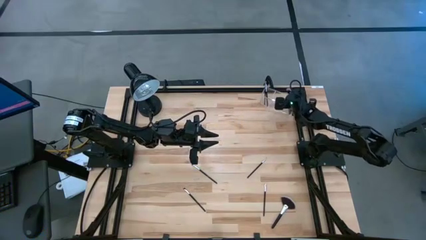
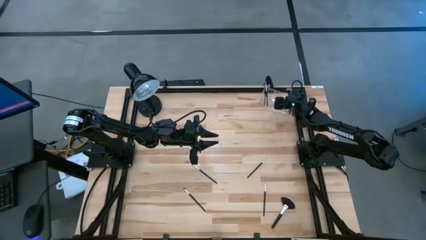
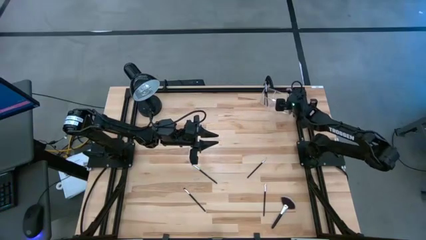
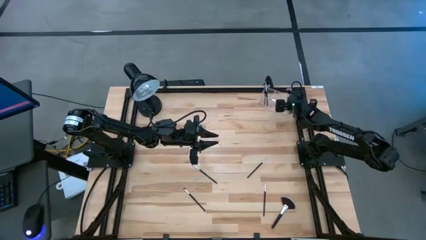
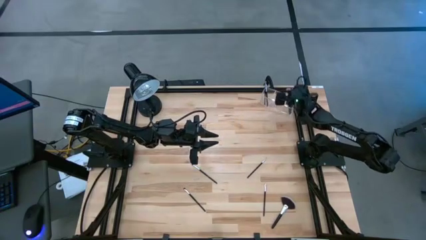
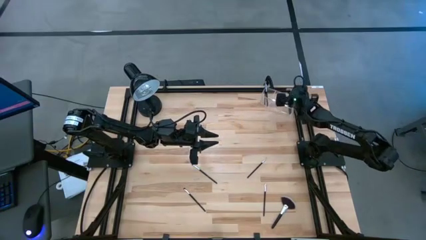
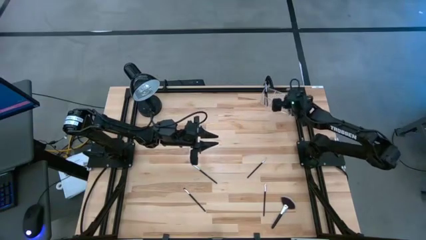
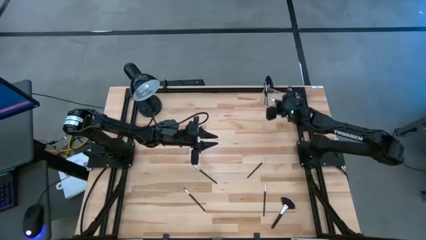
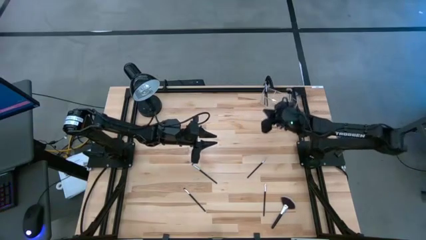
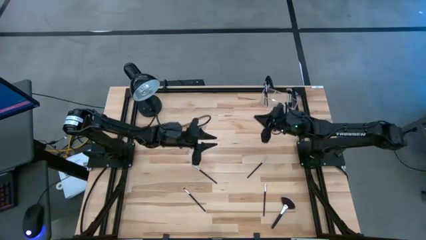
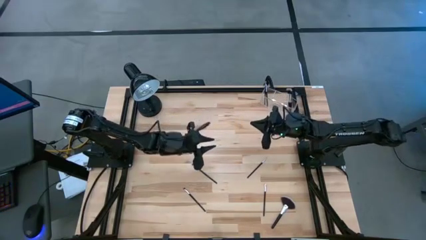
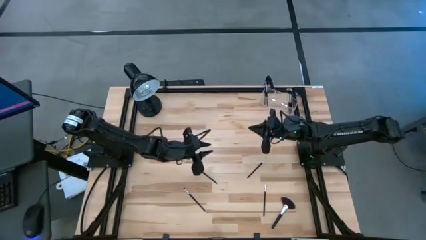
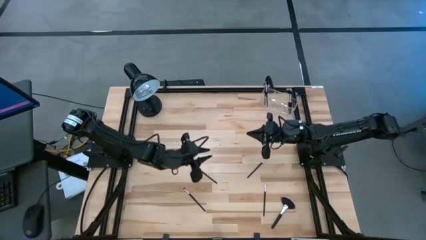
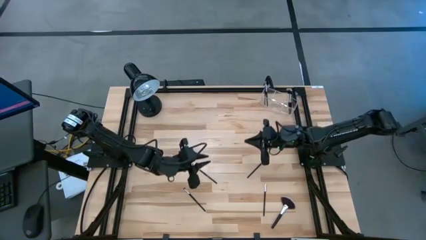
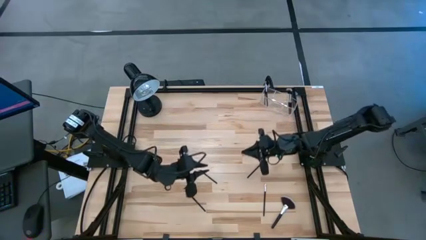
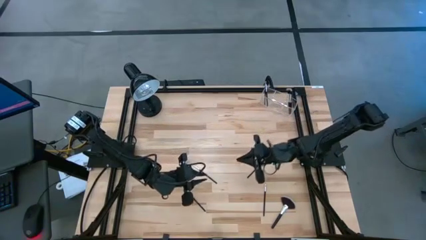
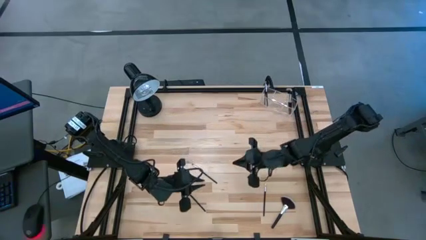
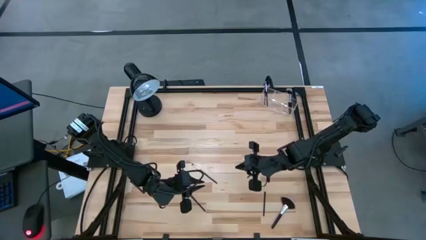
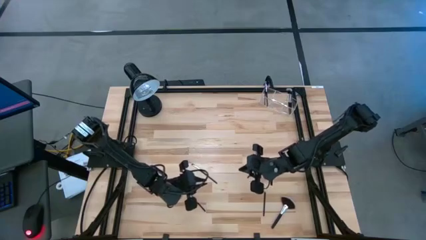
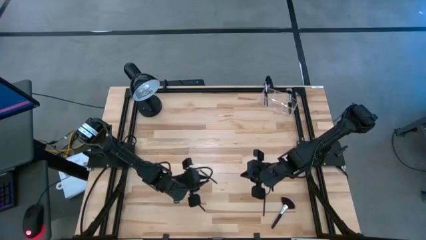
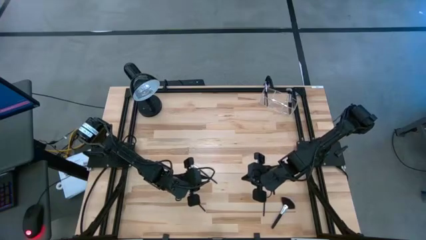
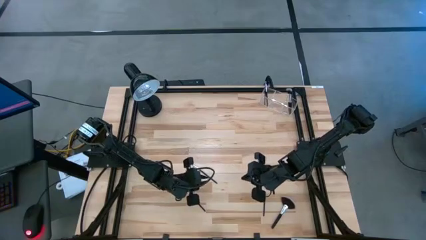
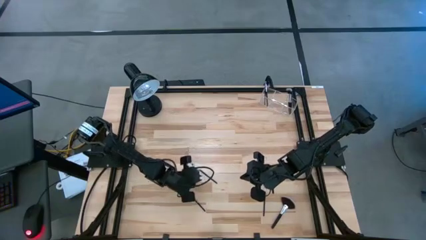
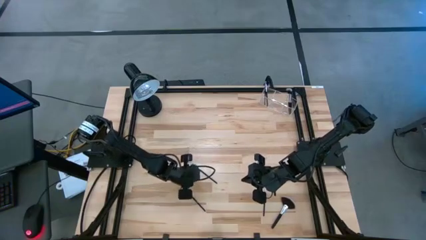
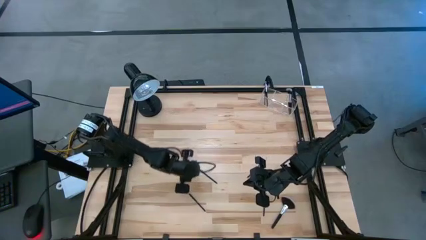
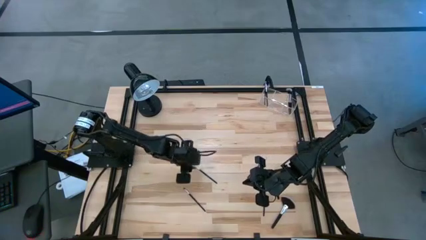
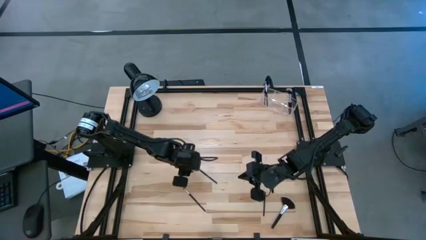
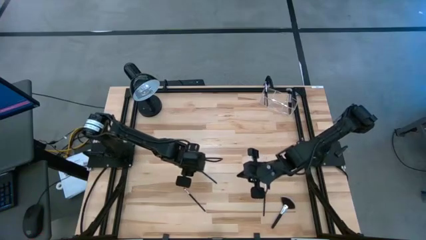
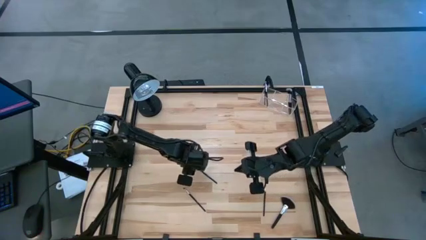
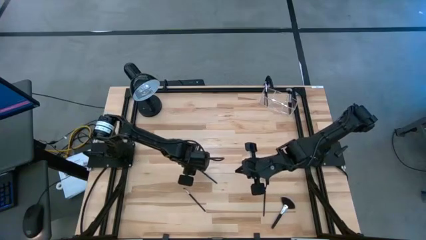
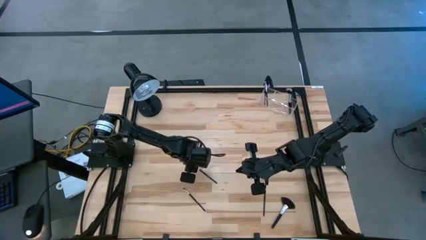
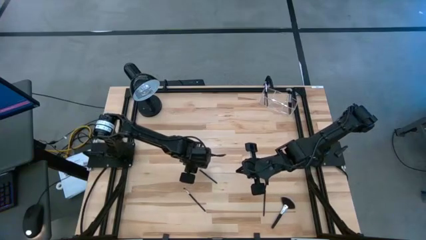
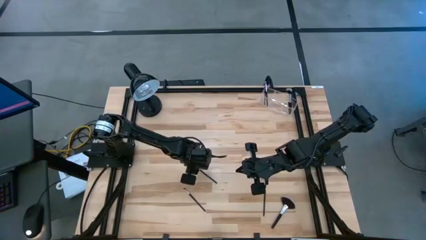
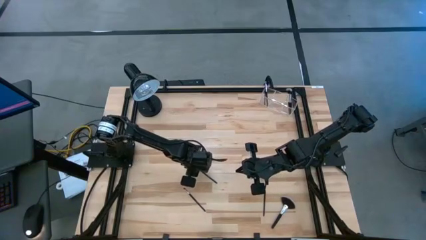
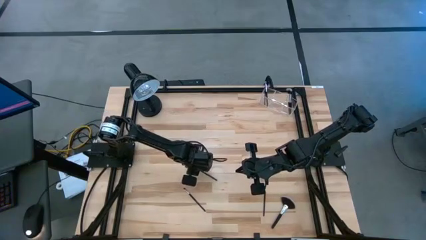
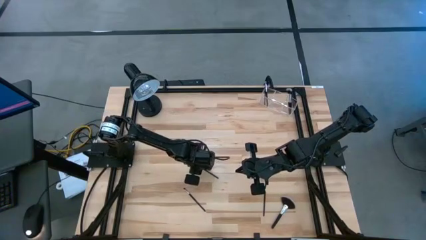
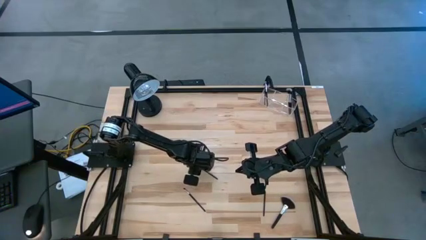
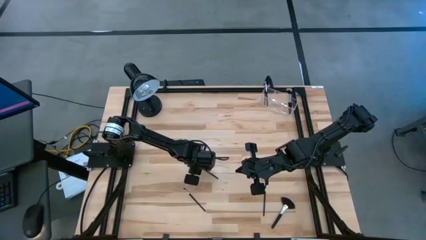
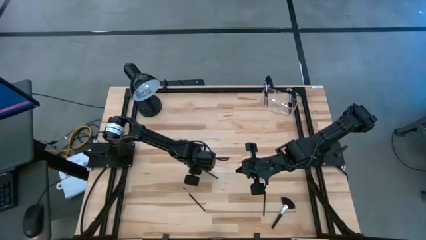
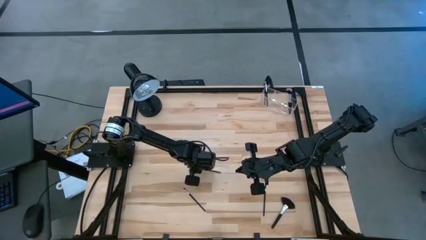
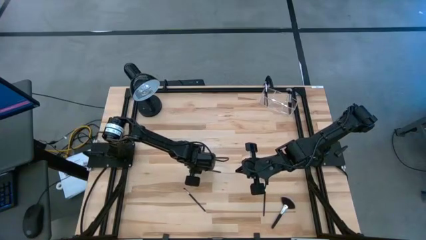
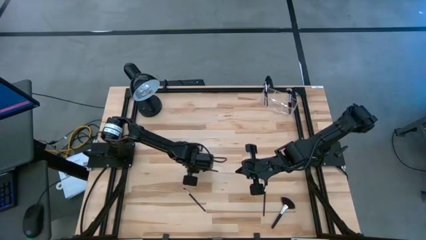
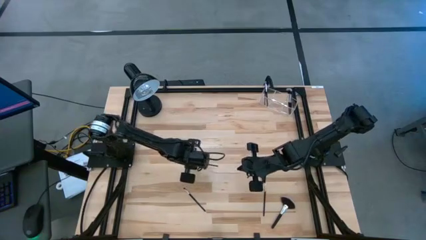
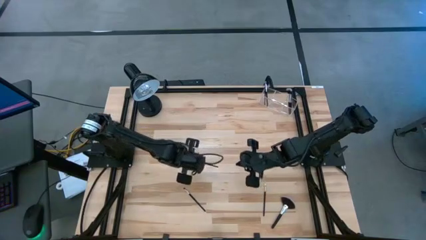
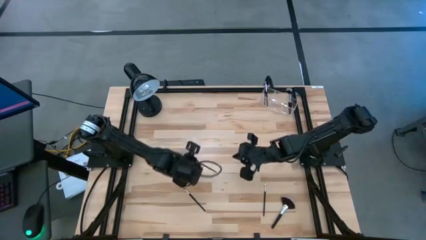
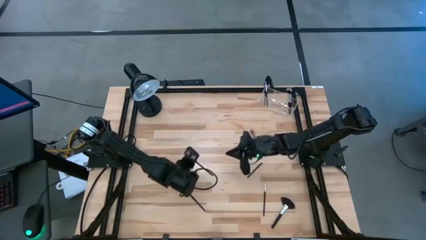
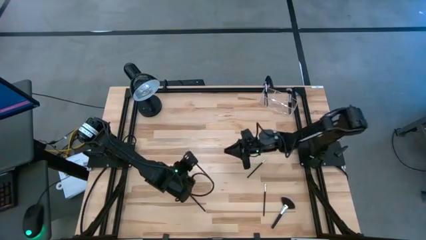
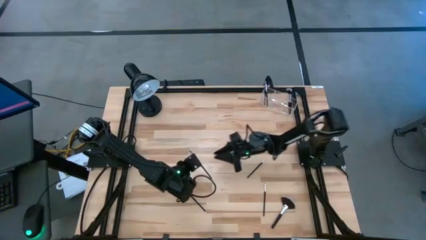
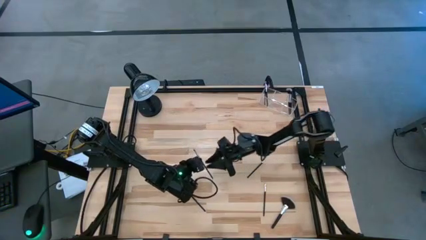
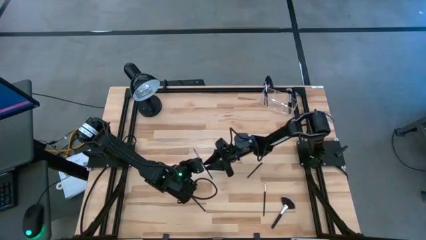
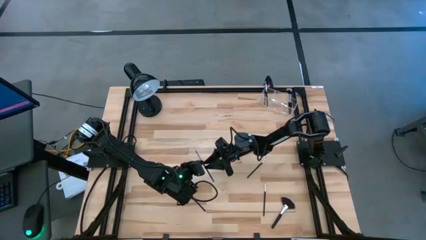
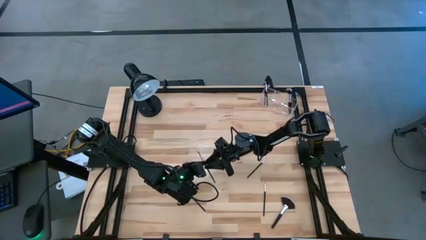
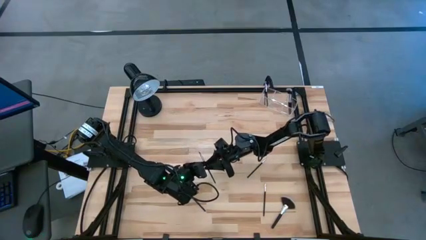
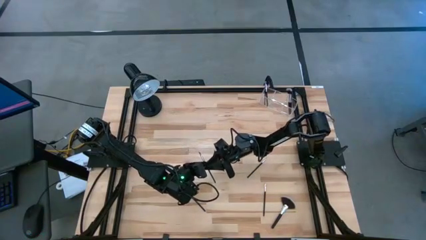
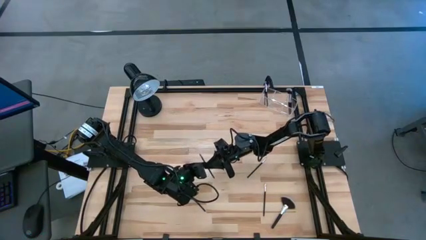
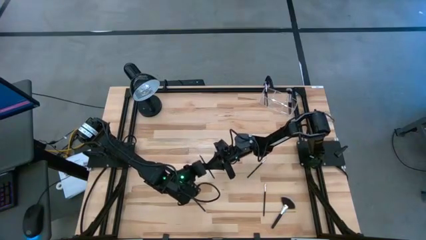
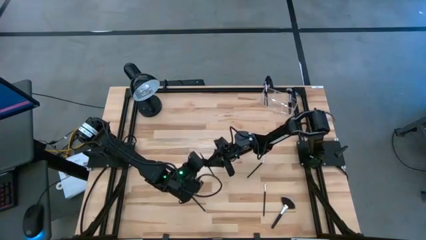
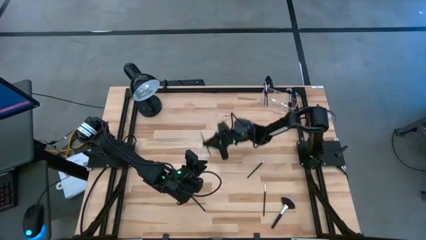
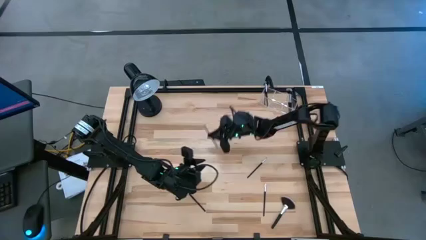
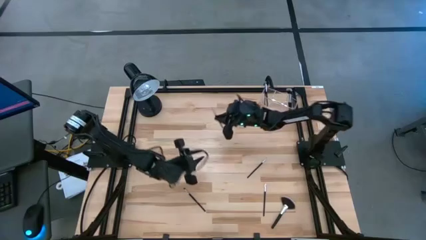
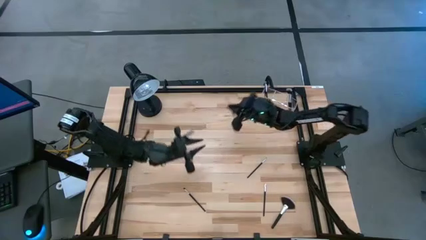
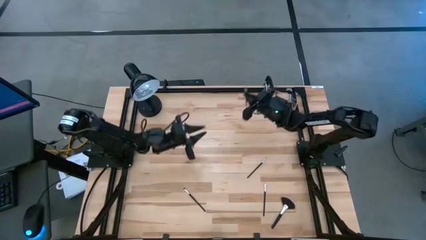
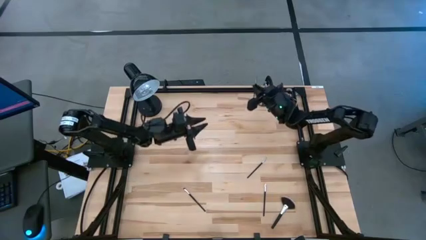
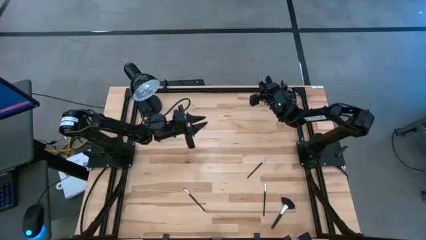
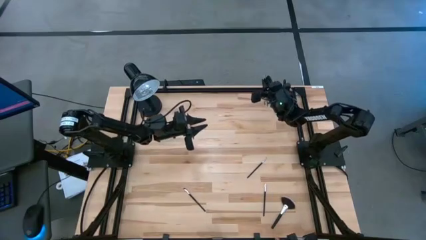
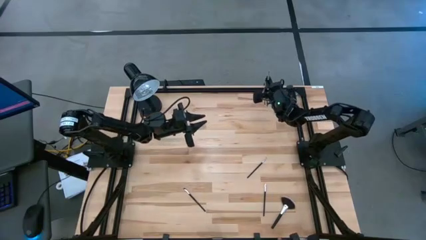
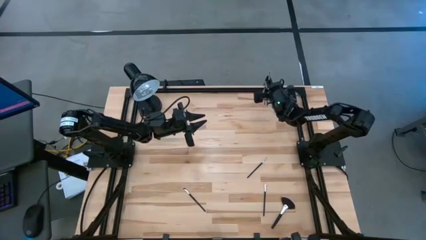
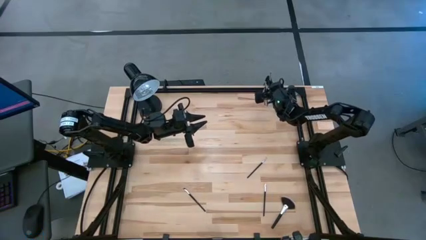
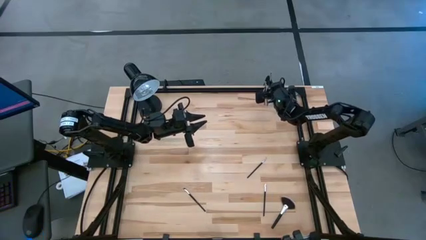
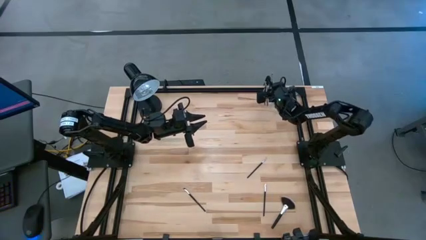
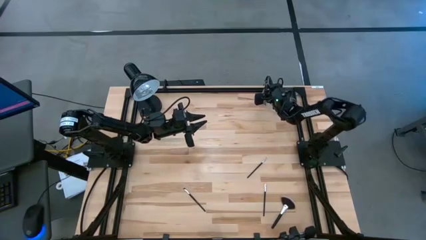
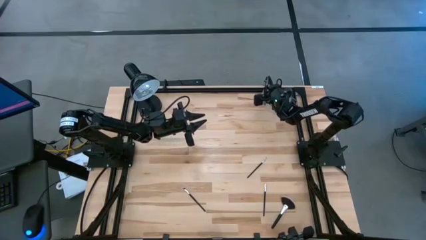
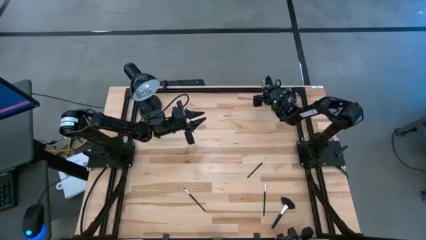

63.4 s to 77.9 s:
Task: Sort items
Put the foundation brush into the transparent organizer

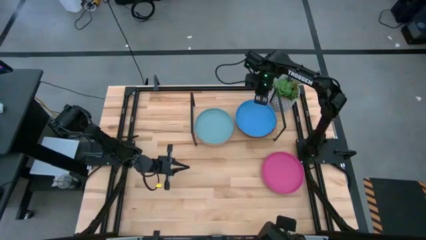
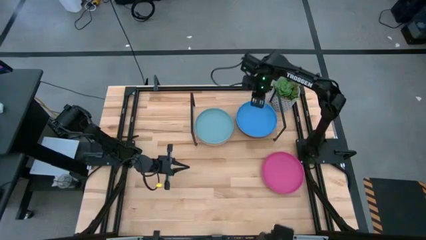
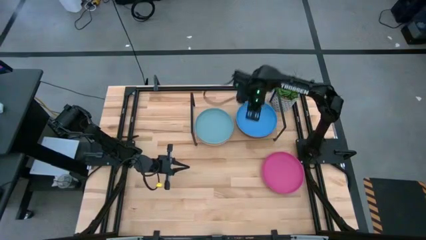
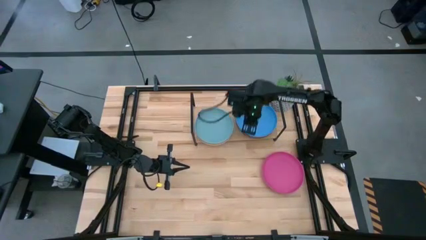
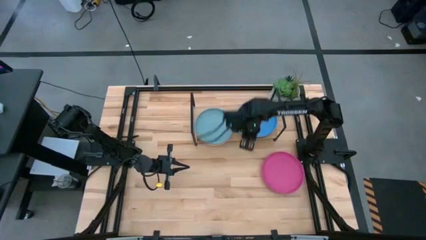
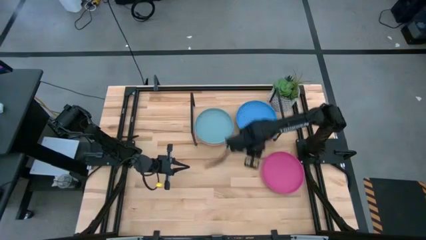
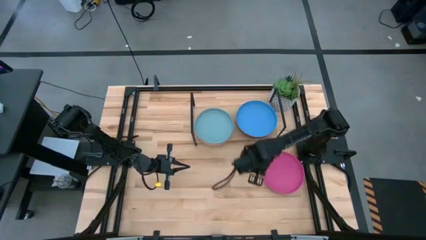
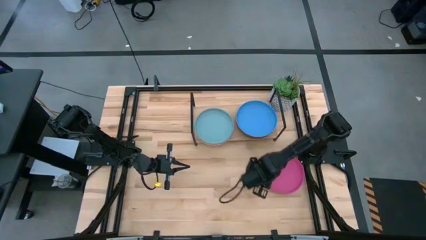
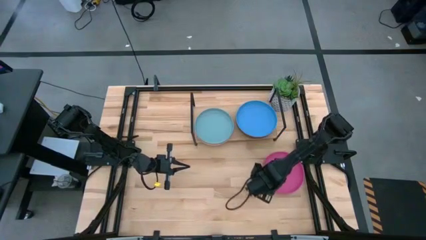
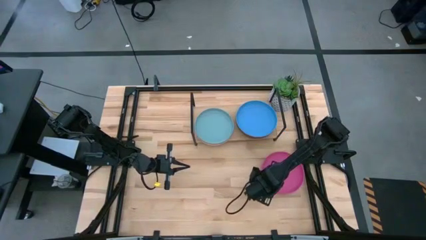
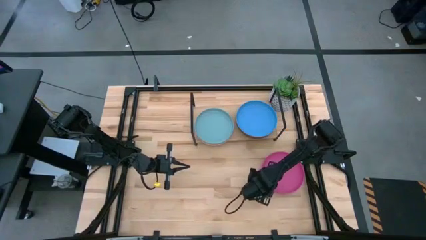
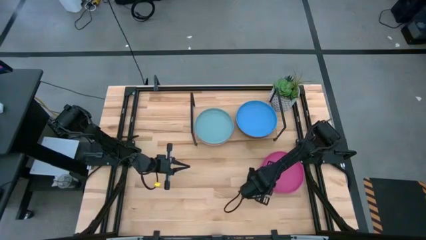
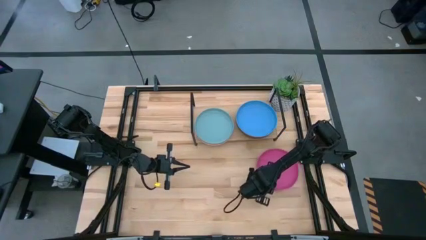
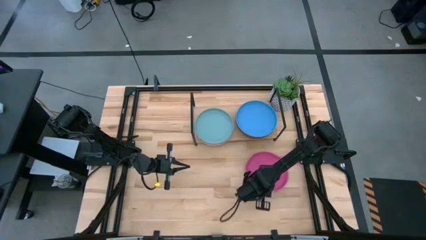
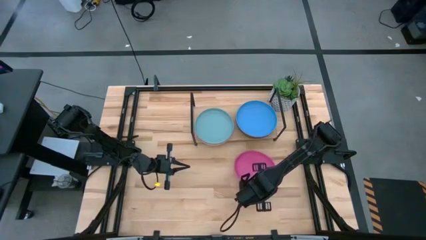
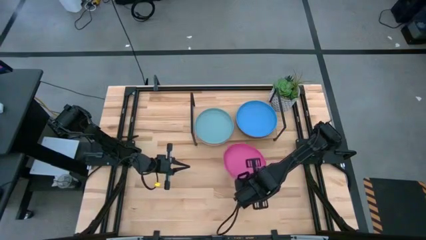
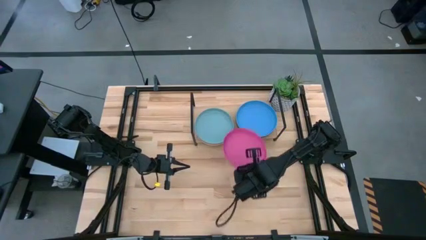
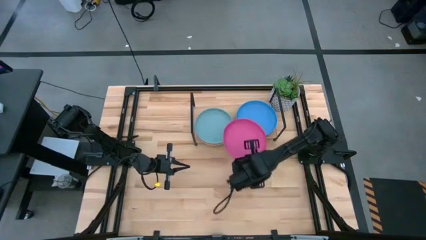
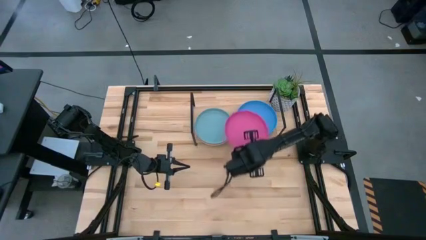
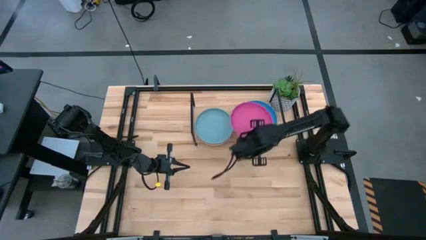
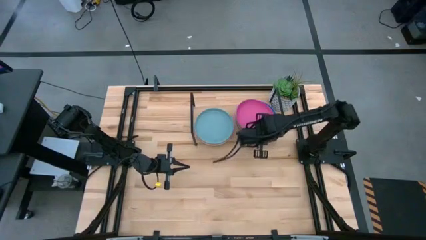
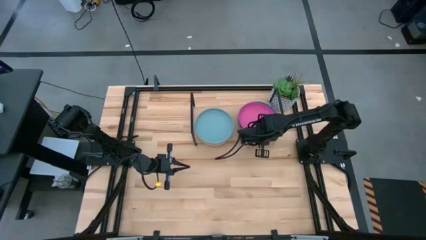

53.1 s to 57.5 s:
Task: Place and stack plates onto a shelf
Stack the pink plate on top of the light blue plate on the shelf
